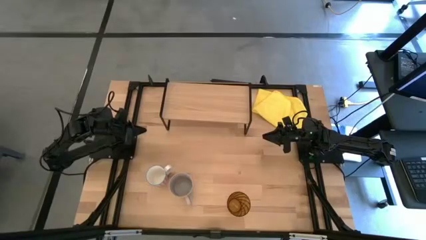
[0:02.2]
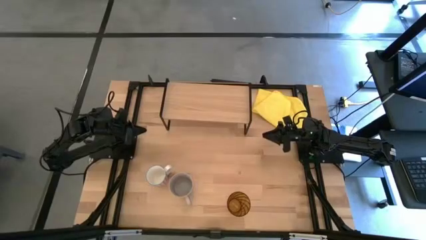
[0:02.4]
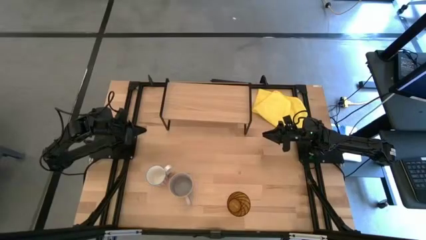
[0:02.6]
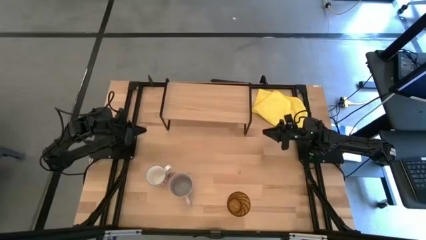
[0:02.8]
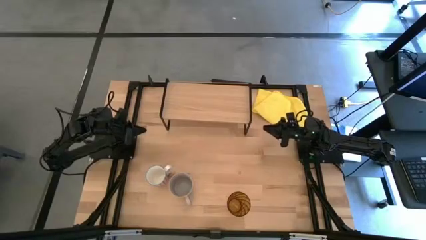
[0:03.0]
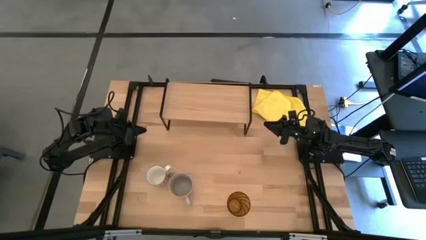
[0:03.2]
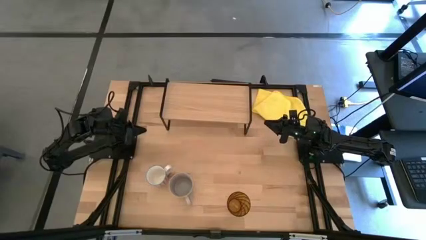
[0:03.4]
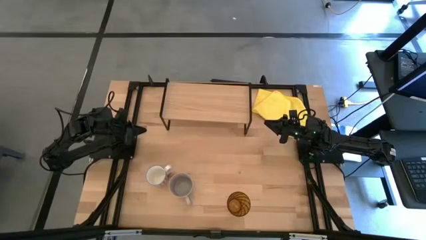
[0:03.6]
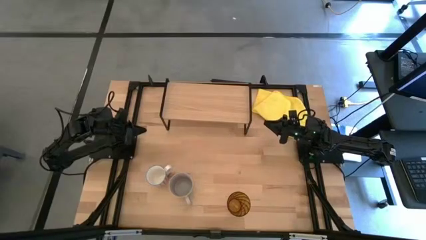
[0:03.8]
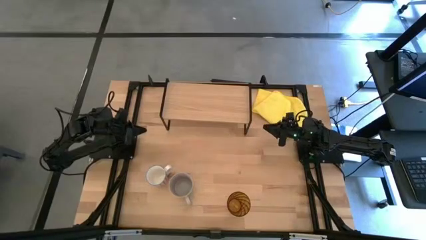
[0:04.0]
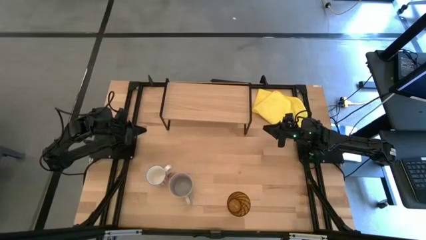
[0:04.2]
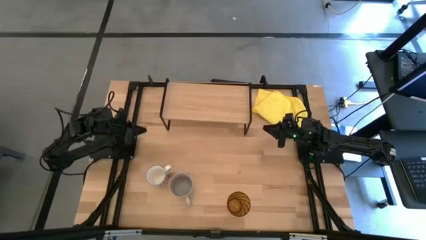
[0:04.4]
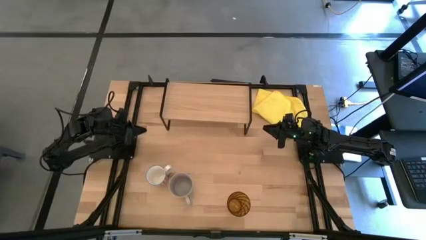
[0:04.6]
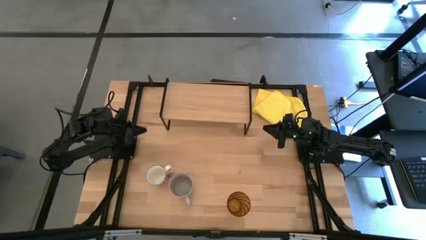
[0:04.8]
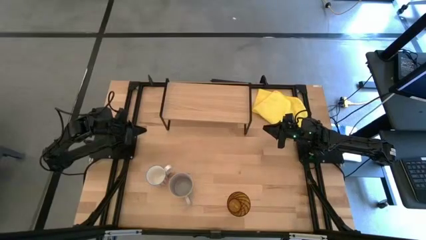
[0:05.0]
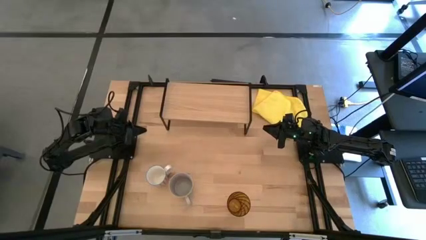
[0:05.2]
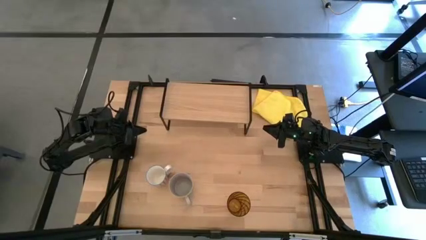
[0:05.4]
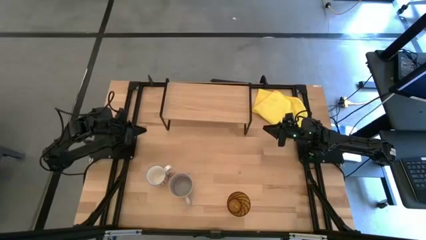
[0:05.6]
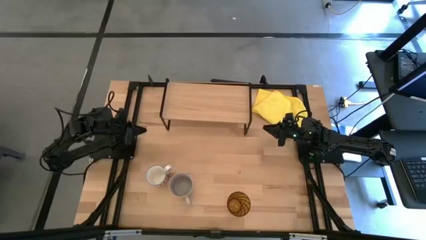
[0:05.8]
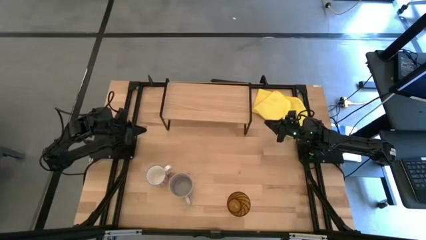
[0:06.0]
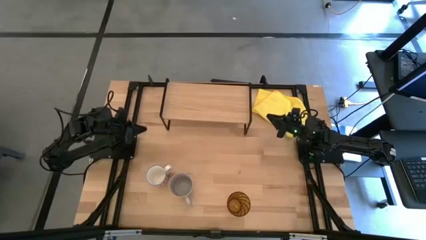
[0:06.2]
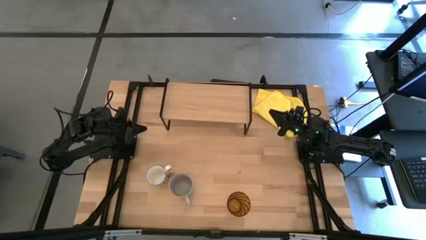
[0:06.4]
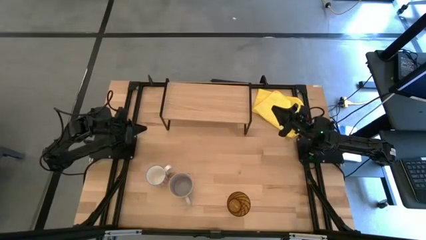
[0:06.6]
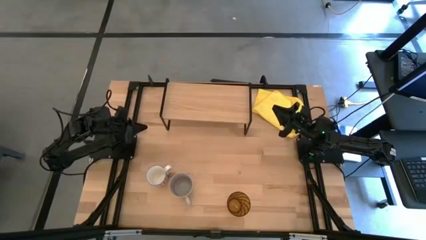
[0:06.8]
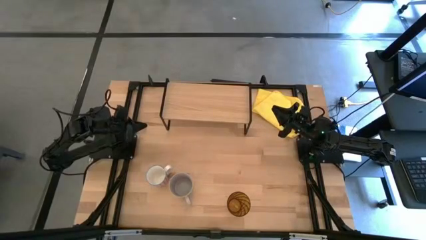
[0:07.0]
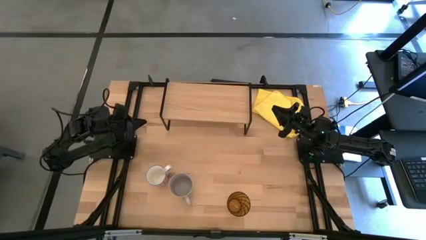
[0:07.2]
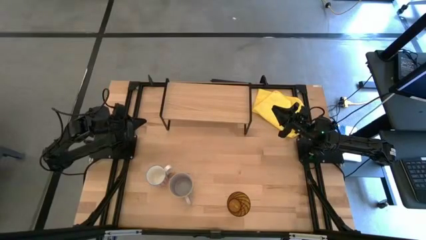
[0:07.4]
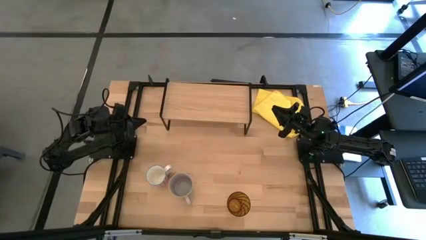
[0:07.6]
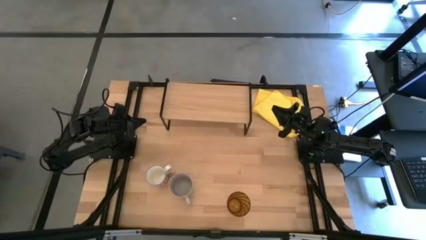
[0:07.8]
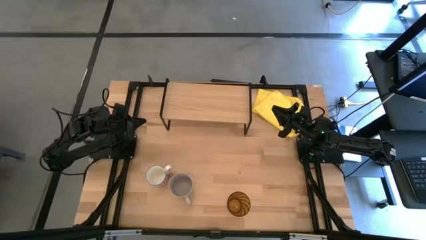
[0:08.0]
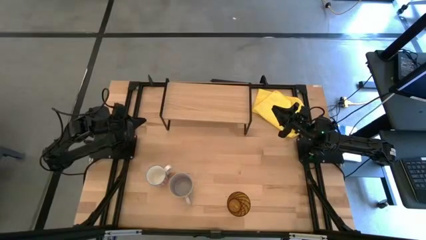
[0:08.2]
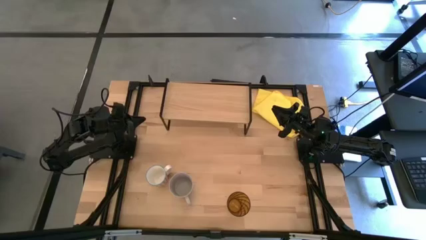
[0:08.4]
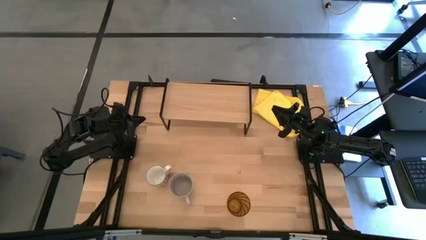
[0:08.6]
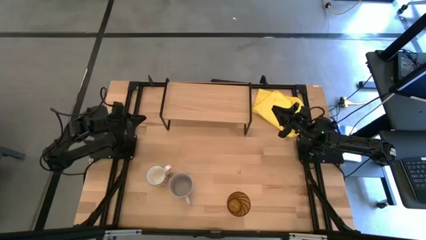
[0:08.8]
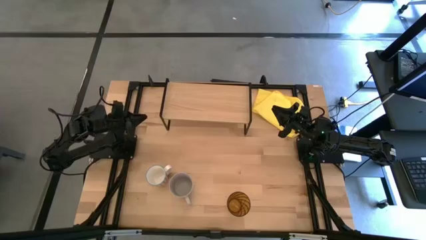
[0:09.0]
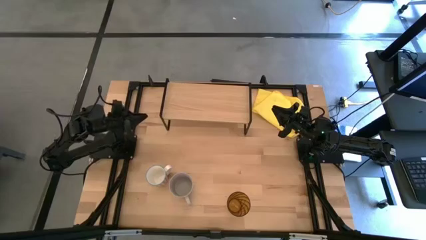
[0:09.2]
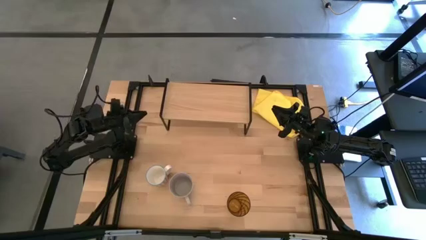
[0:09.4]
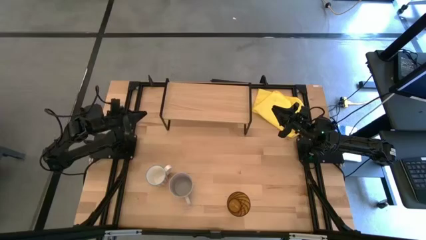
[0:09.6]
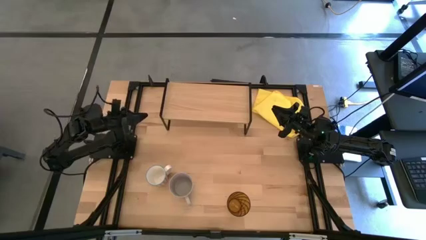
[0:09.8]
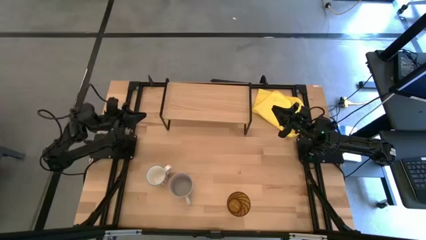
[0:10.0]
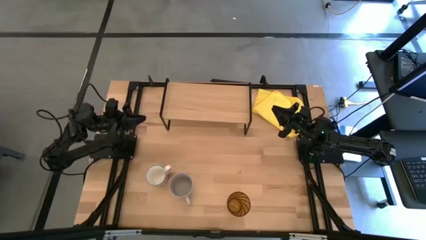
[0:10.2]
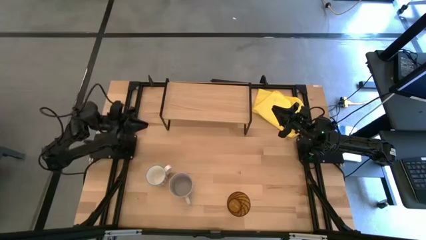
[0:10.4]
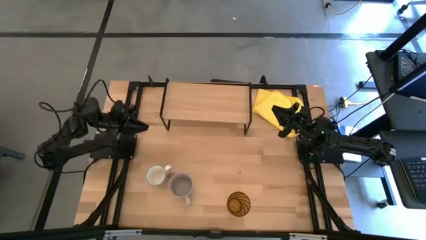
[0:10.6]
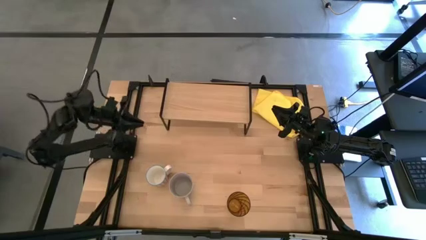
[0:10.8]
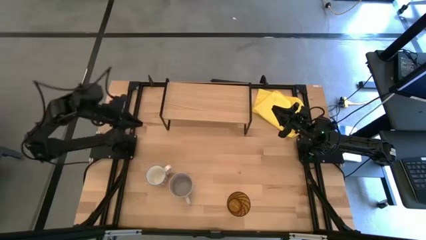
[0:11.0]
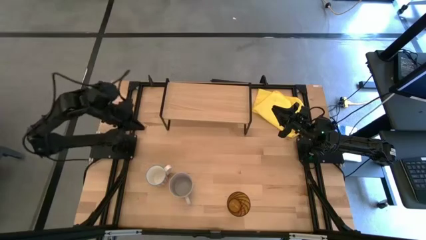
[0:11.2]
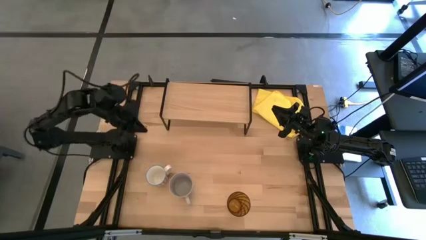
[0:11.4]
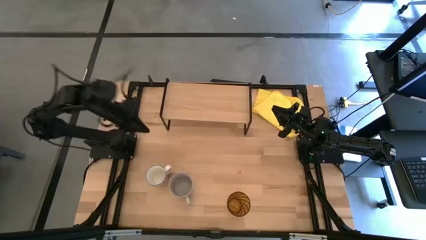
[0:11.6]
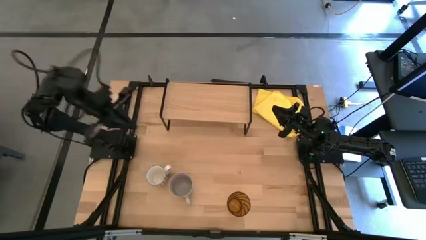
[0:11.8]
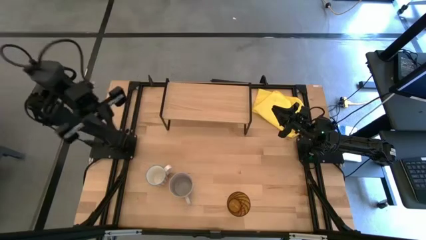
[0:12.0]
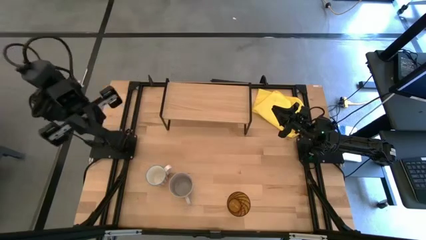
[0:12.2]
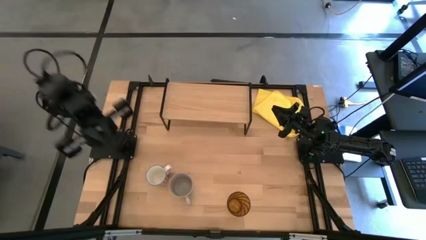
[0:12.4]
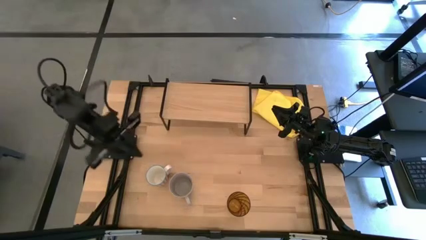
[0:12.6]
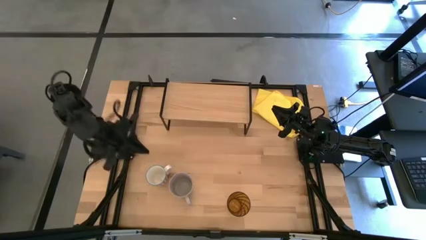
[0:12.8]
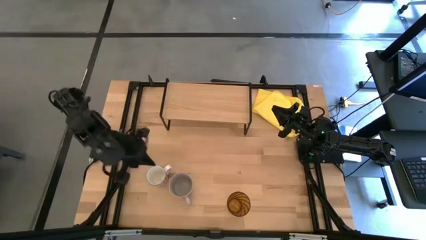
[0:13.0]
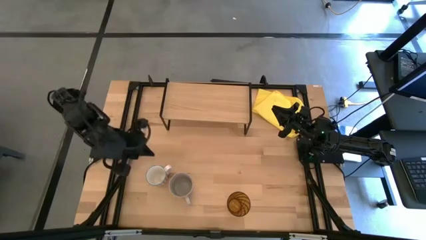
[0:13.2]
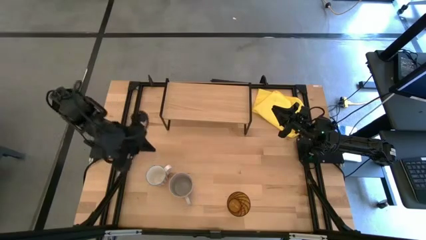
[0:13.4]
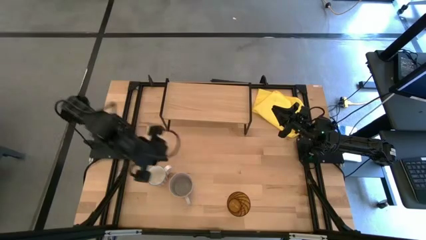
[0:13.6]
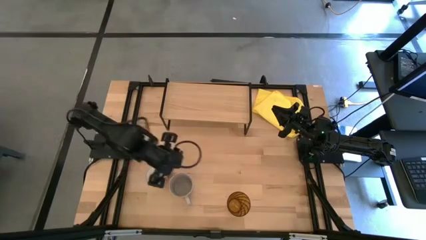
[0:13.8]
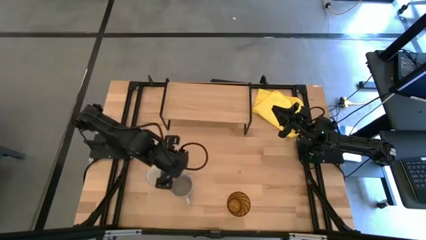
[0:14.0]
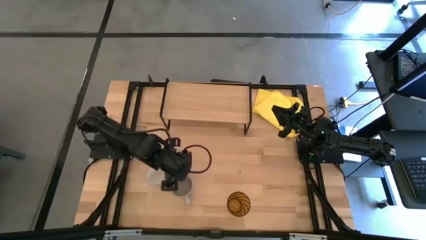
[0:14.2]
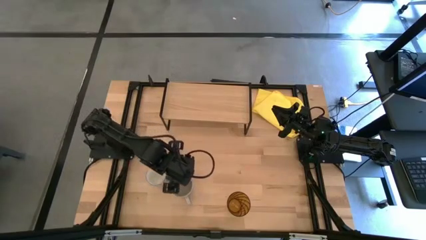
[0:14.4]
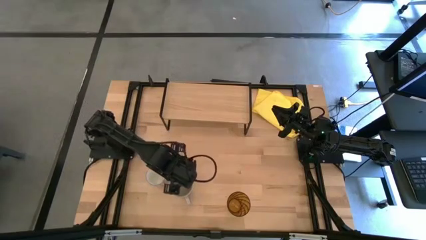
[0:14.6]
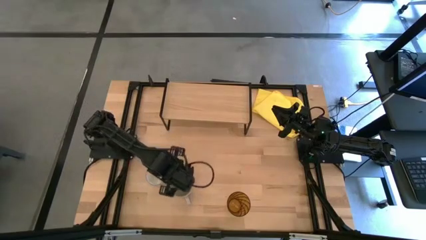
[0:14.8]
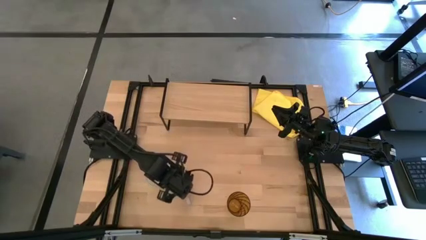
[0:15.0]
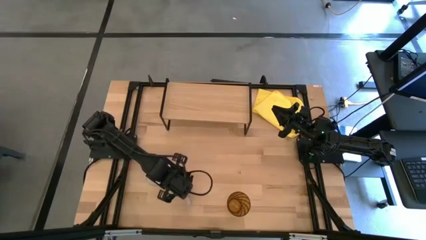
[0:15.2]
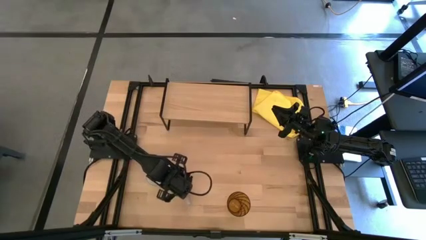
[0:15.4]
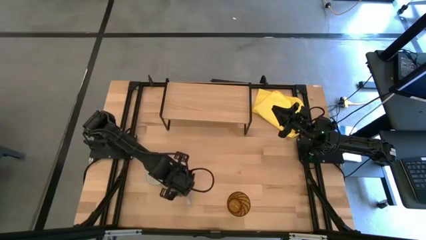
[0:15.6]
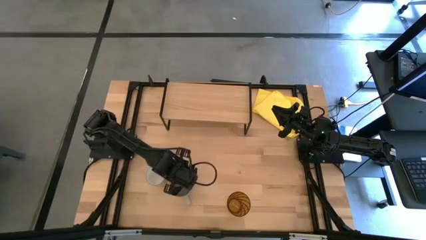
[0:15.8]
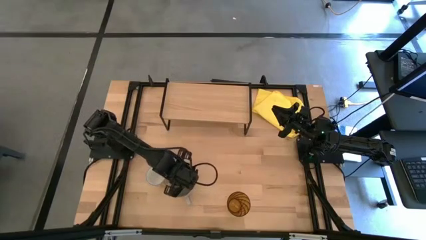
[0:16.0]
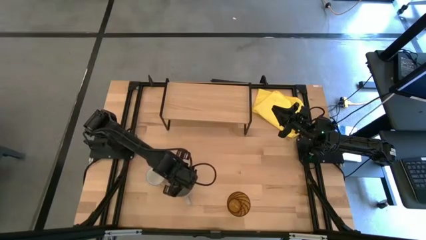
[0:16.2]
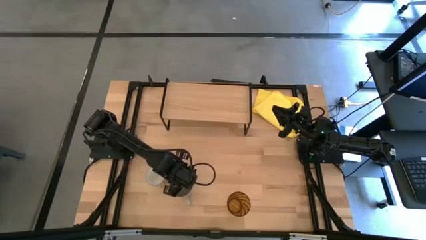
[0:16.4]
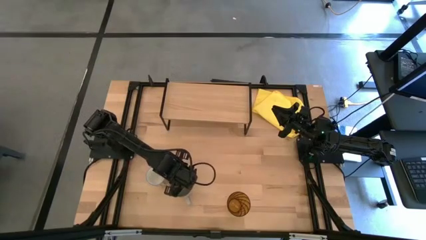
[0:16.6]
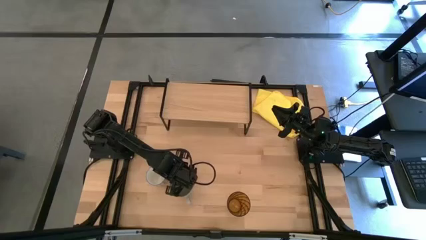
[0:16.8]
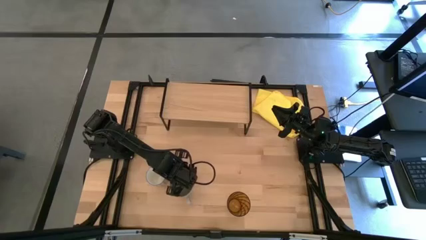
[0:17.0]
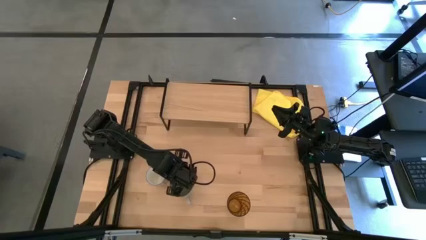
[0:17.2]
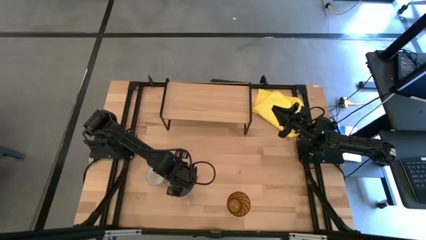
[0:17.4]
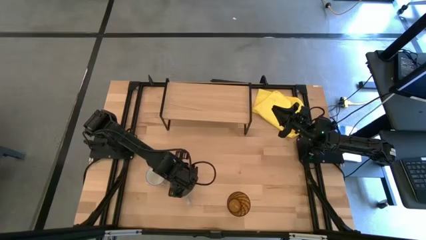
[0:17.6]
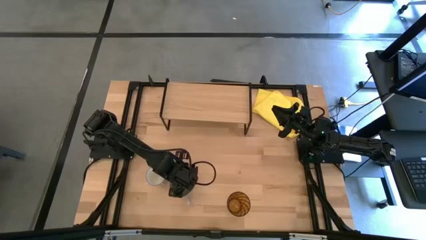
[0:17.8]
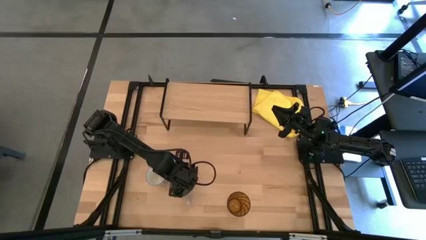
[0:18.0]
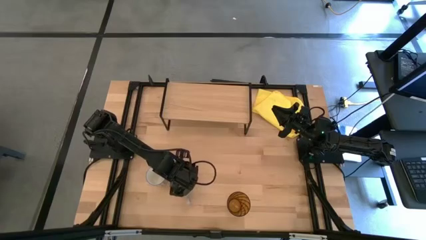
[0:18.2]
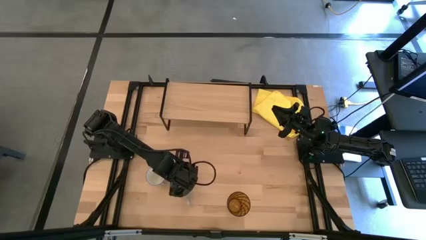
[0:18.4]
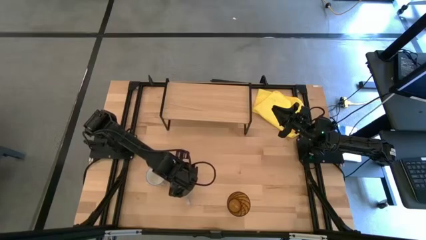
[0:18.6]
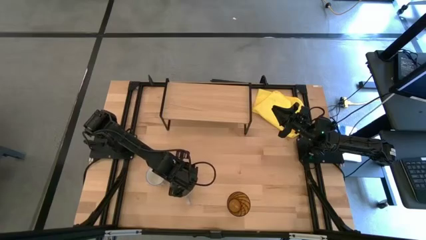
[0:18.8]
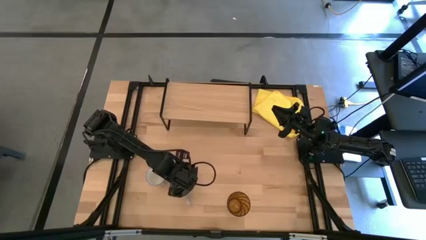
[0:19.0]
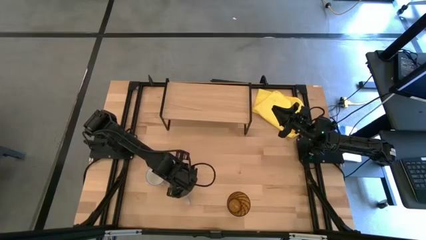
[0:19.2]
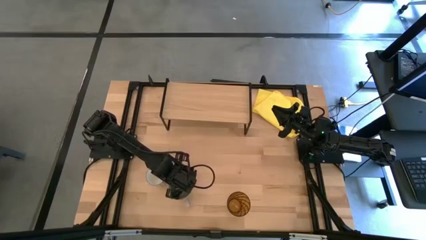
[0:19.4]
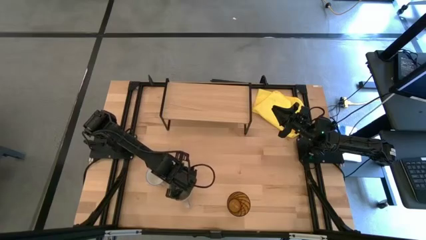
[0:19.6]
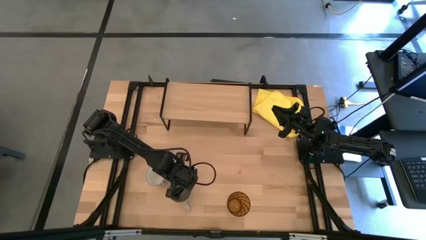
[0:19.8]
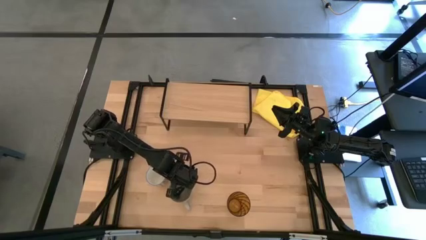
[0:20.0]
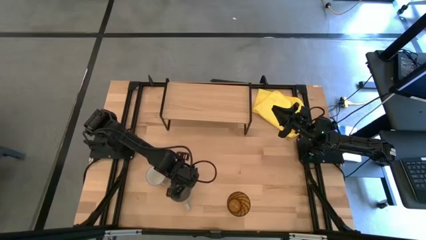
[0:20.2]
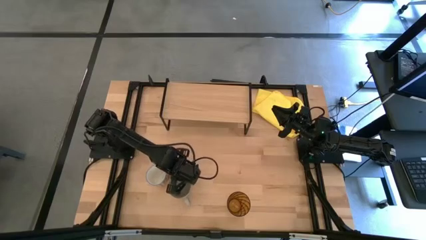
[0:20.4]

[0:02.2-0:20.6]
Task: Stack small to large cups/mugs on shelf
Put the gray mug on the shelf
